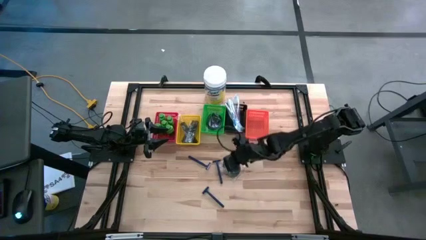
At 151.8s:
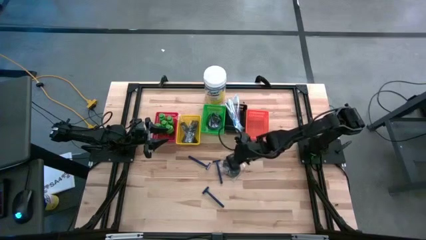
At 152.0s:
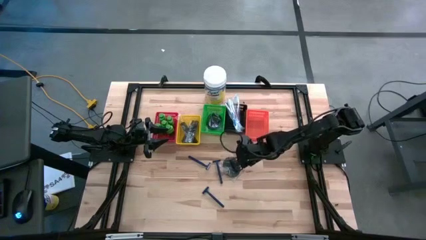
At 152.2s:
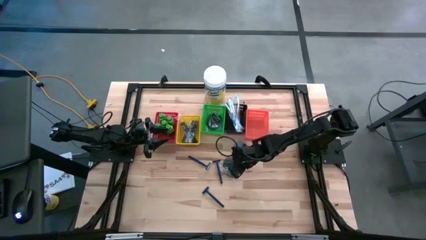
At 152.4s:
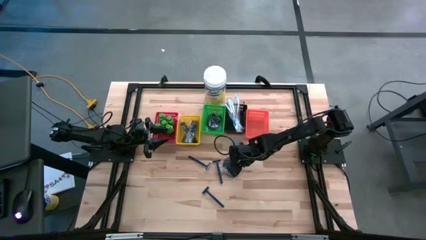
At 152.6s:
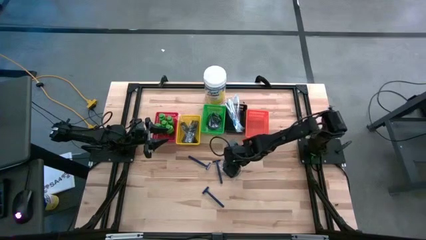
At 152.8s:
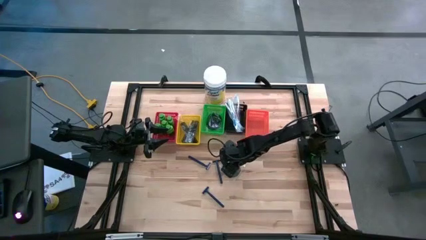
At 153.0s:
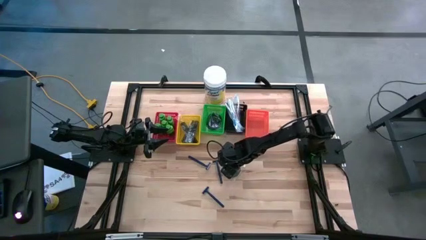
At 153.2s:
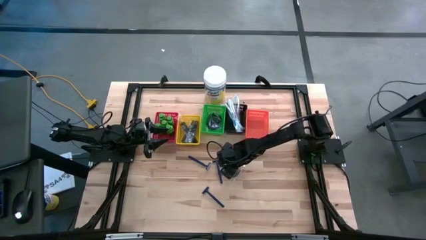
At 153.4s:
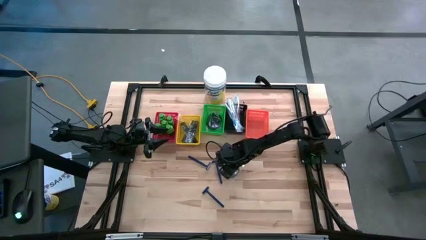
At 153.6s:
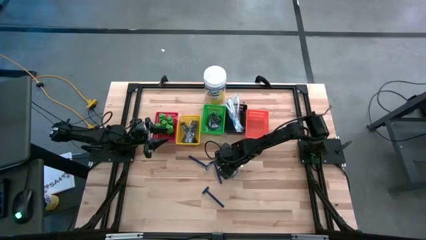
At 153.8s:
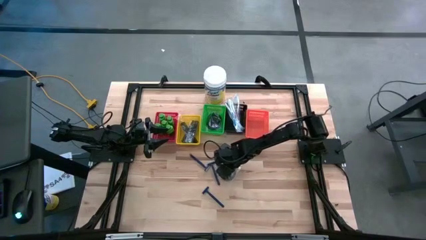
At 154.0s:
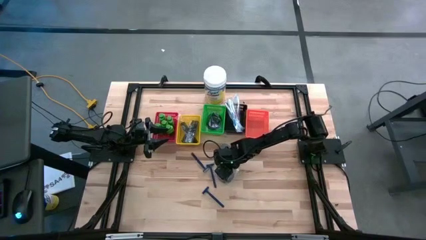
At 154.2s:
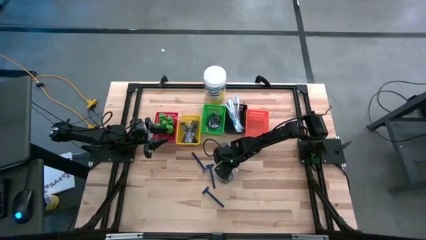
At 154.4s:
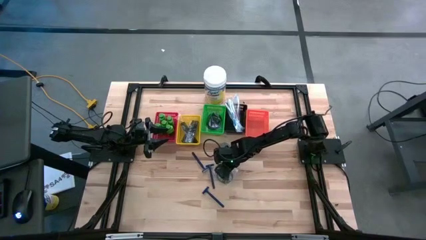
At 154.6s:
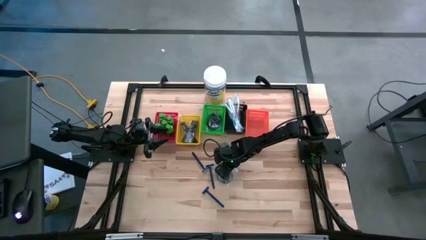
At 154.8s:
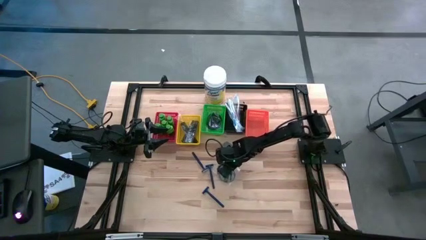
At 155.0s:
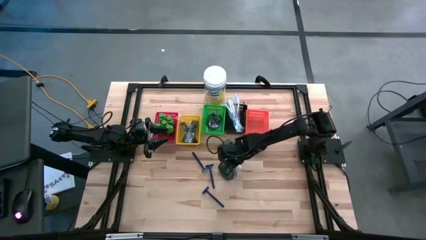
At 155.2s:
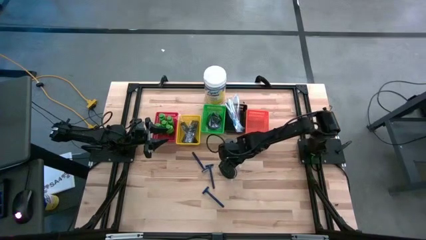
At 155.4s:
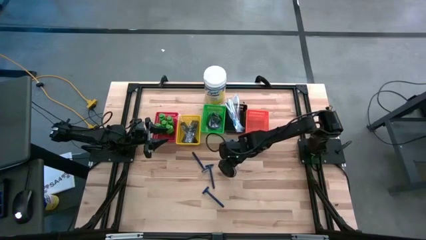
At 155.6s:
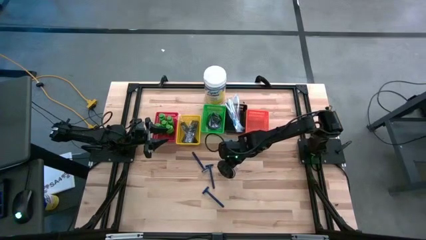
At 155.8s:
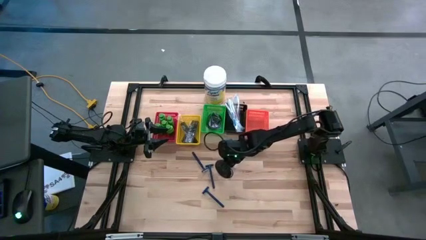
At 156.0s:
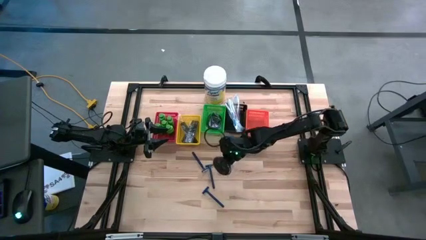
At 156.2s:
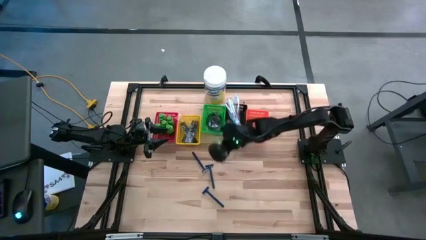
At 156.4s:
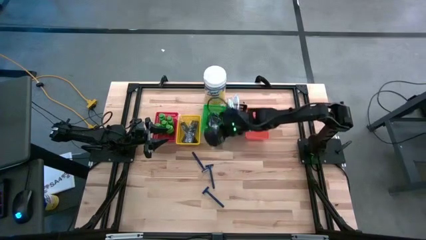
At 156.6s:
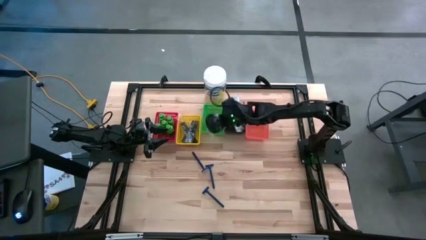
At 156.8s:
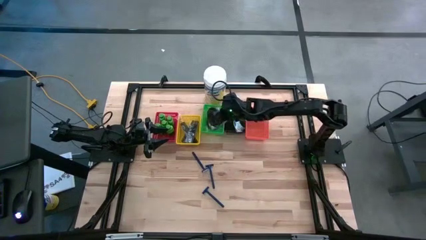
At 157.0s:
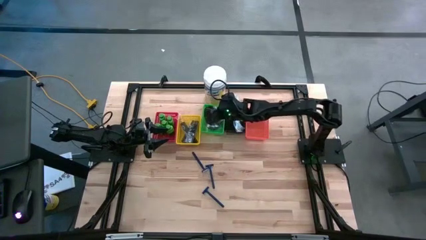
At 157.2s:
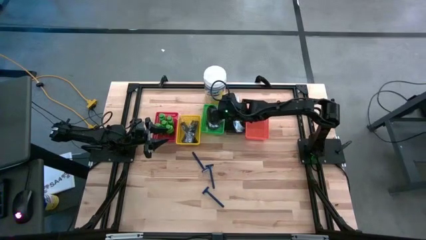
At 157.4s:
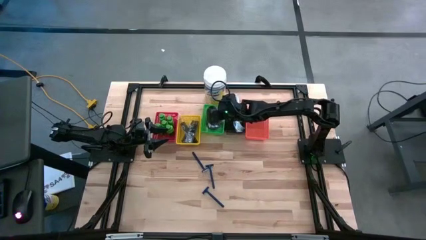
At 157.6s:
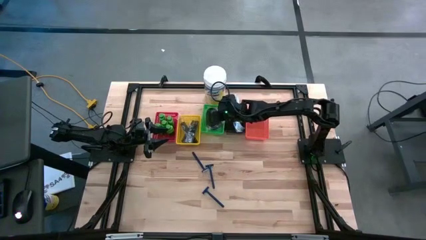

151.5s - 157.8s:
Task: Pick & Place Travel size toiletries
Put the black hairbrush into the green bin

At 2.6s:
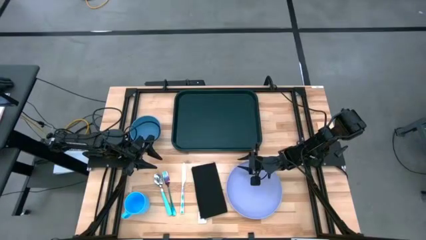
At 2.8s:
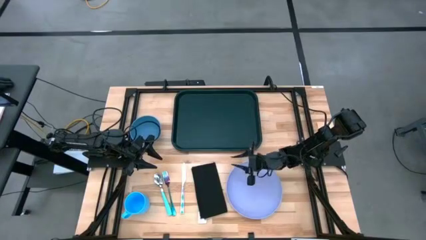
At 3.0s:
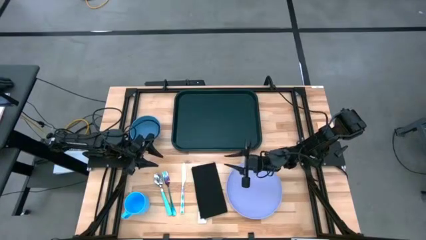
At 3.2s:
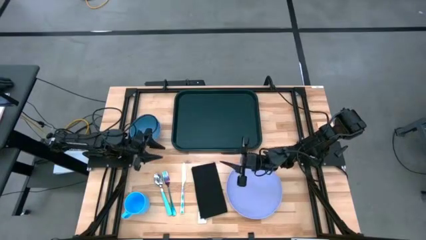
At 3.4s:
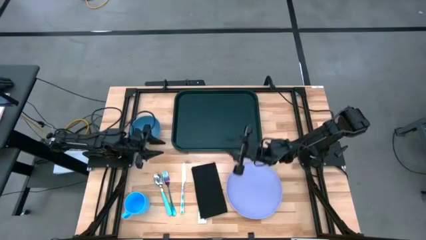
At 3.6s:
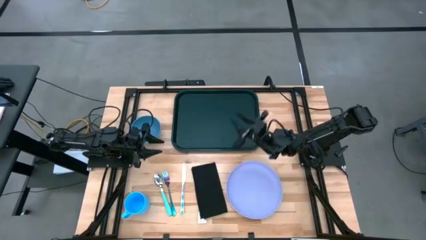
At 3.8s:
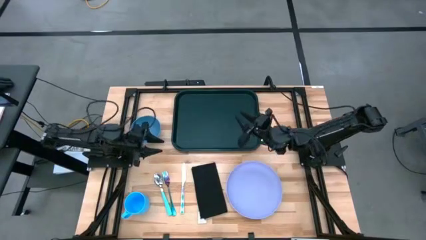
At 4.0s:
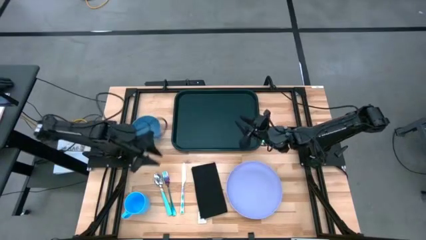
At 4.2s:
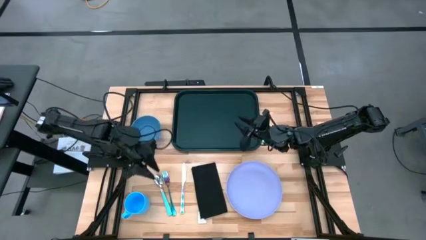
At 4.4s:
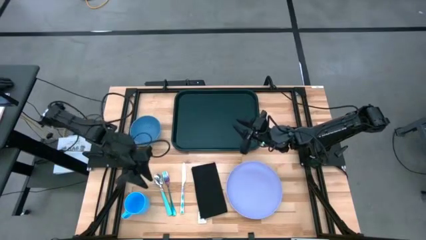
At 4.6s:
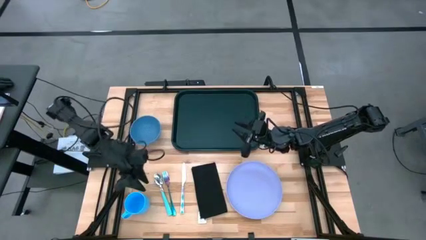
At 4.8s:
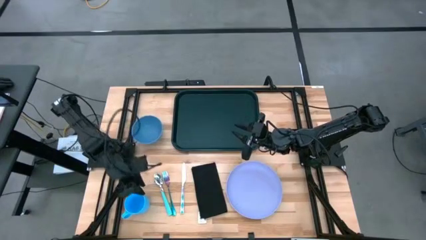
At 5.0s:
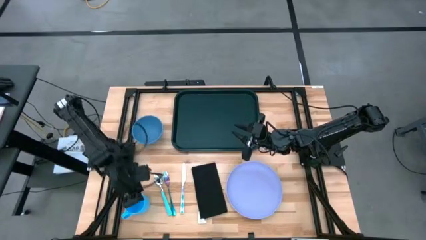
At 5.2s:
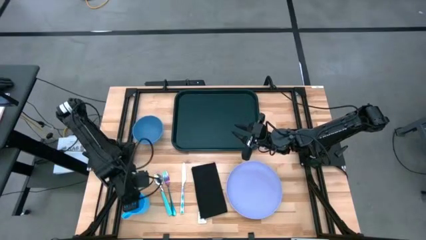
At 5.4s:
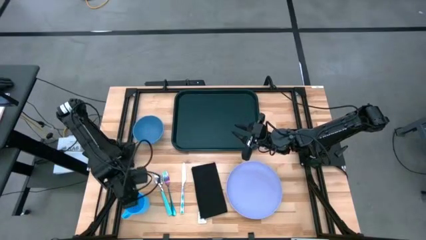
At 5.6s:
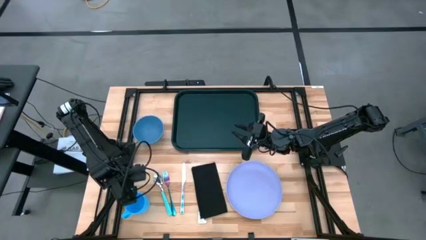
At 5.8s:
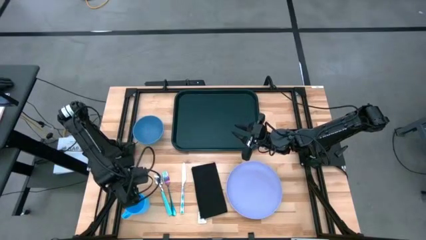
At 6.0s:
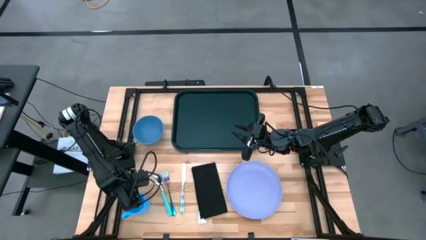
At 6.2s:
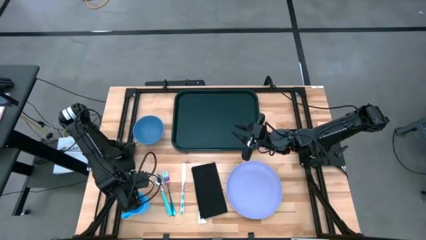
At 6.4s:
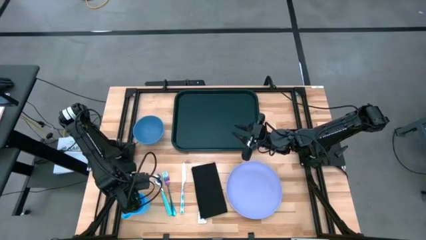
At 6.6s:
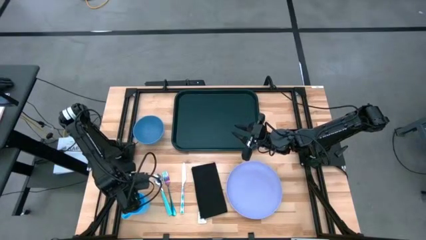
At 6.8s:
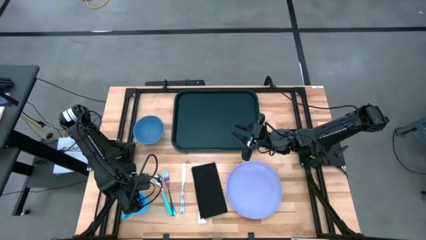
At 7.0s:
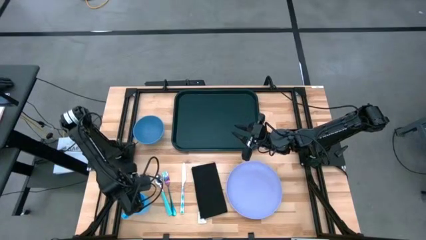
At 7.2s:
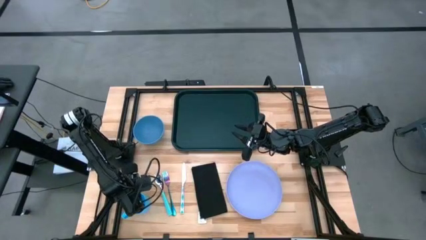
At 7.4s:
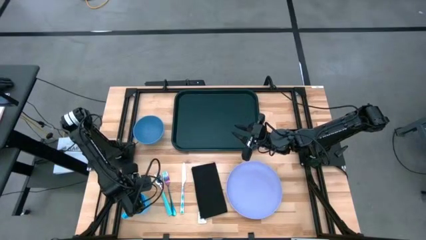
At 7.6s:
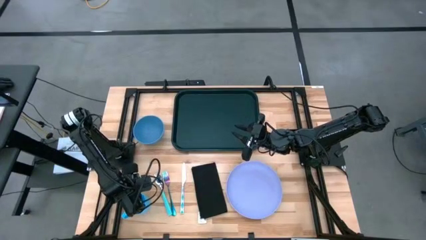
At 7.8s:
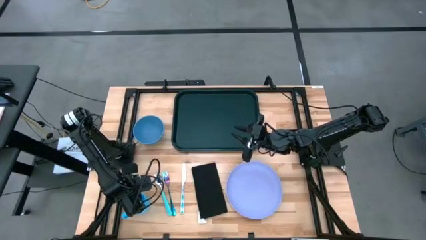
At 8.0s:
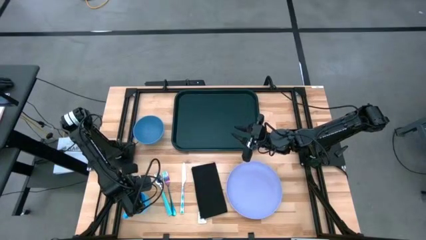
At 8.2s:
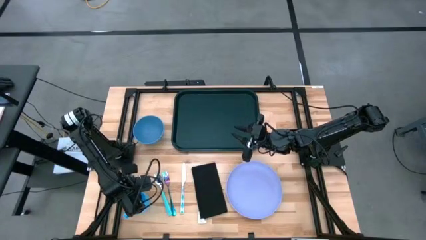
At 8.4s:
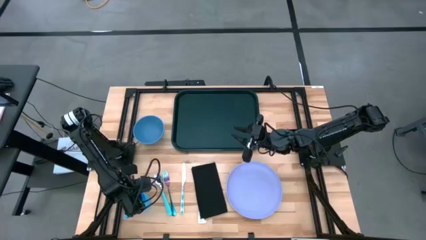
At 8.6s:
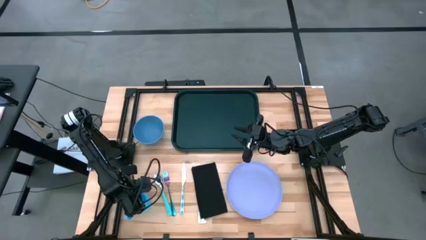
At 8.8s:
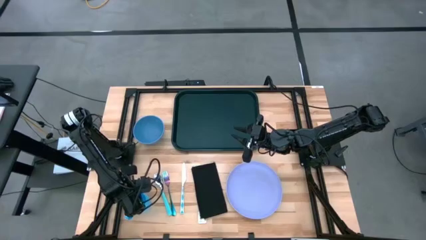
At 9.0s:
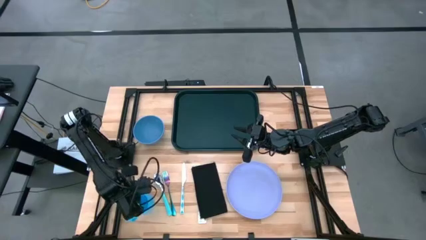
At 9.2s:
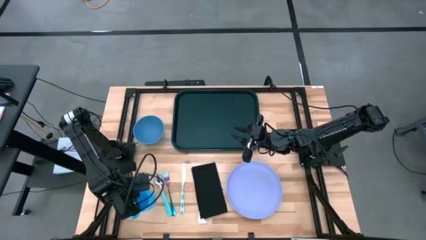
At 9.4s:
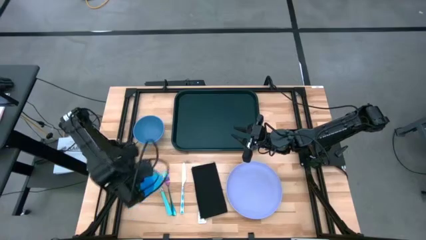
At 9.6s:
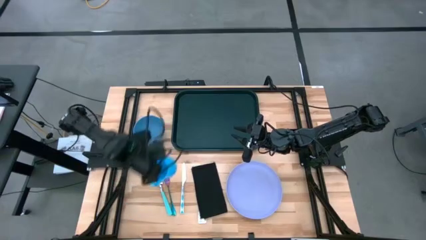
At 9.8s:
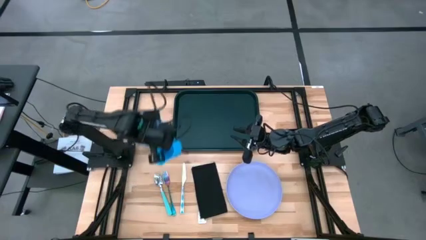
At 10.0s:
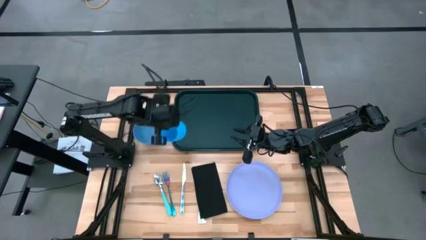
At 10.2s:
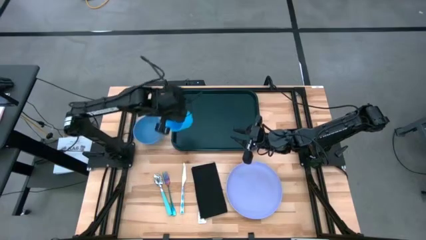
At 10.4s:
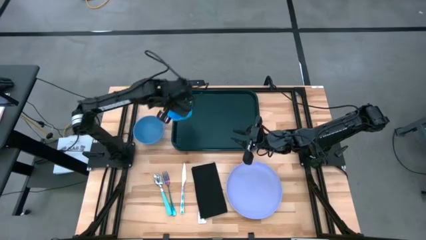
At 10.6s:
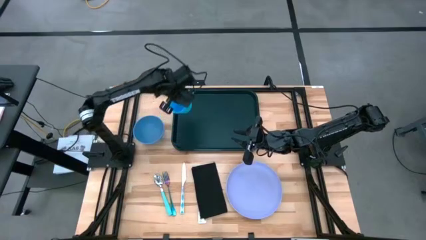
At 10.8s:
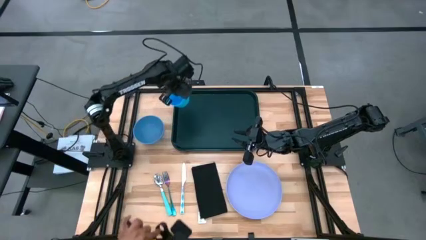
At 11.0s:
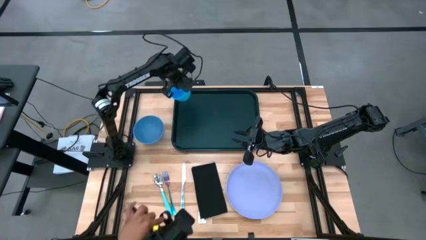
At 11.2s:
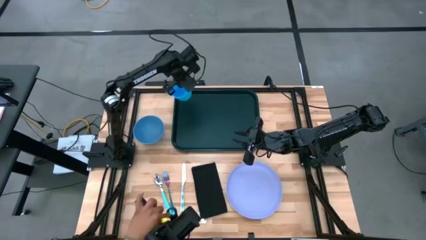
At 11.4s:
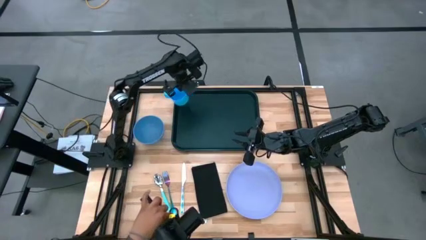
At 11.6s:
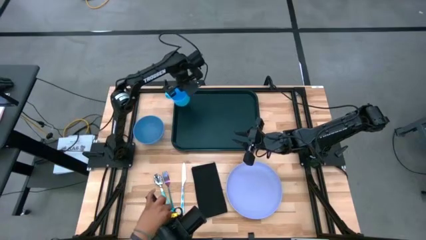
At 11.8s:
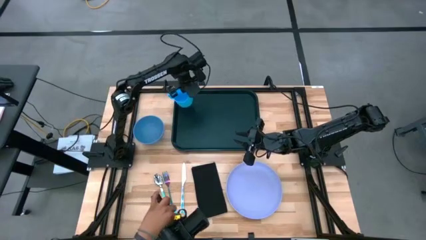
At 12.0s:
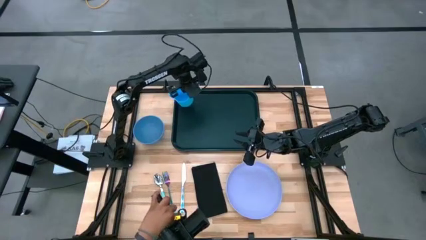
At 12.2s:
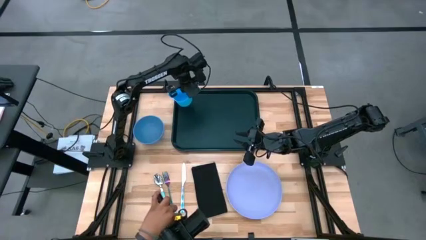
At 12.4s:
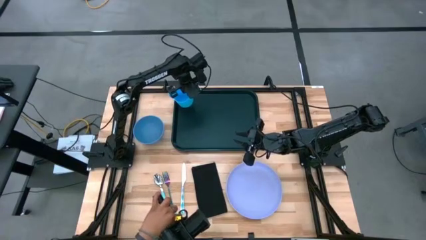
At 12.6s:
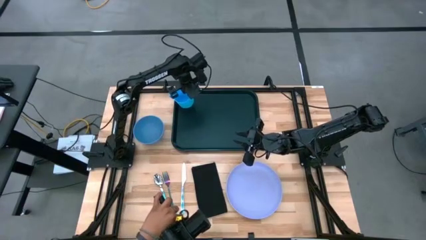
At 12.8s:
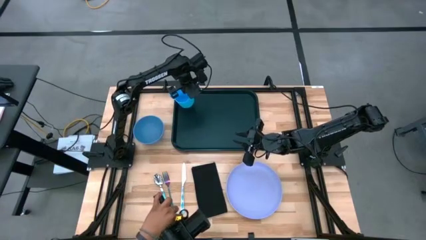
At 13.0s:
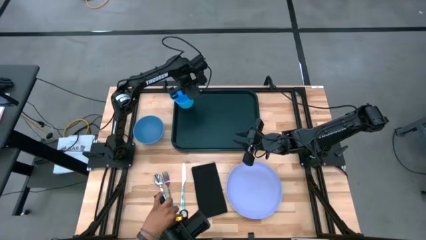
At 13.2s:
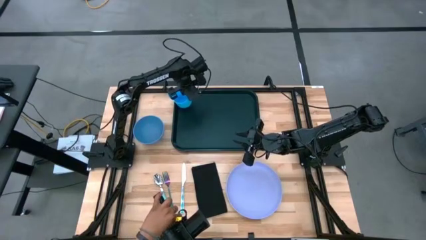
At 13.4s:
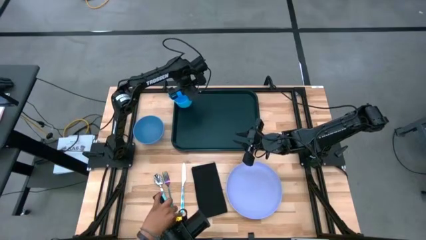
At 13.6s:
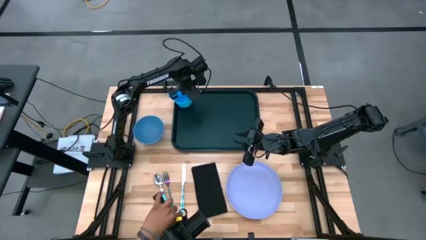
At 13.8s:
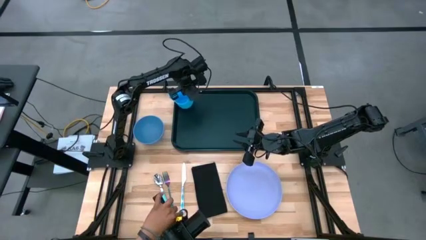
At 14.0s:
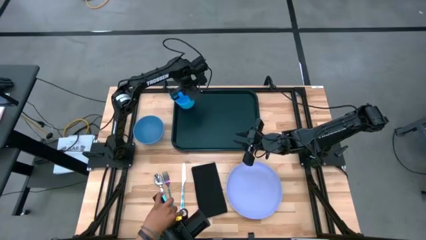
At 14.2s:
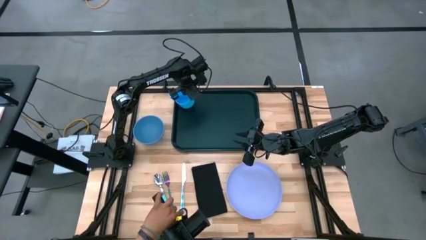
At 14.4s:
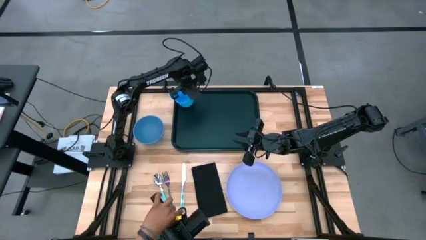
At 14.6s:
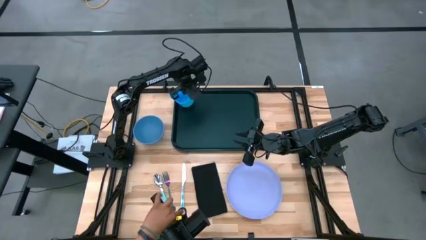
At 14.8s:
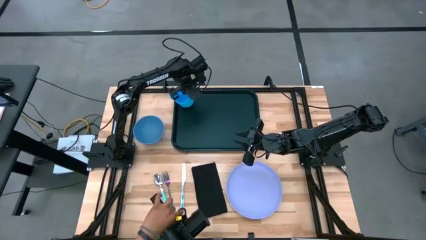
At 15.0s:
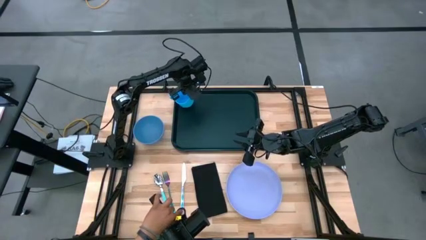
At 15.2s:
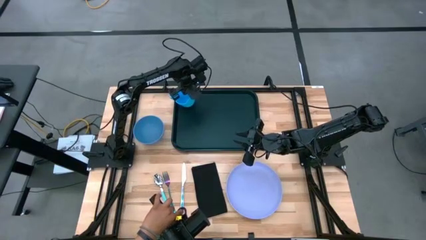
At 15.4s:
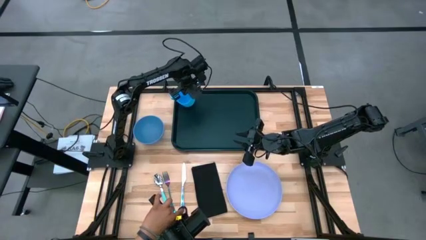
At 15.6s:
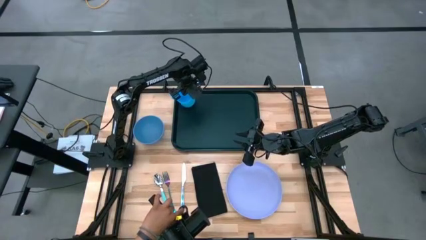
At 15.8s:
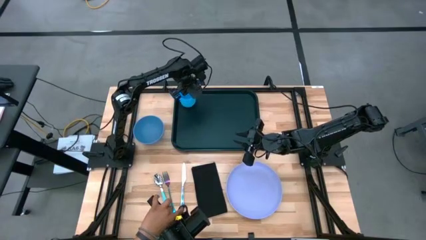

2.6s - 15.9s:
Task: Set up tray
Put the blue cup on the top left of the black tray
